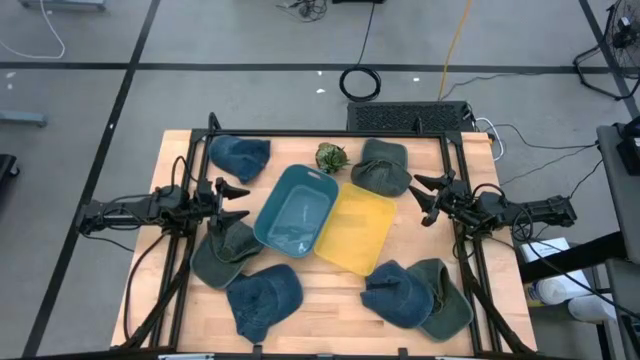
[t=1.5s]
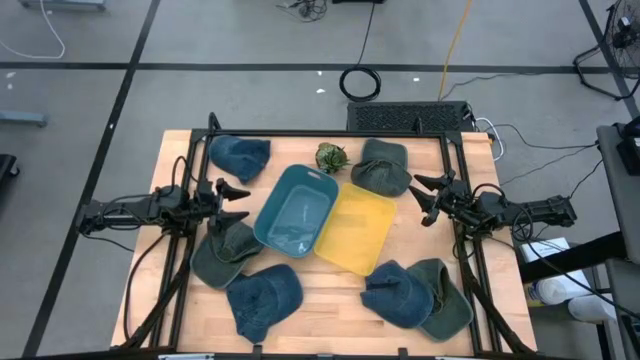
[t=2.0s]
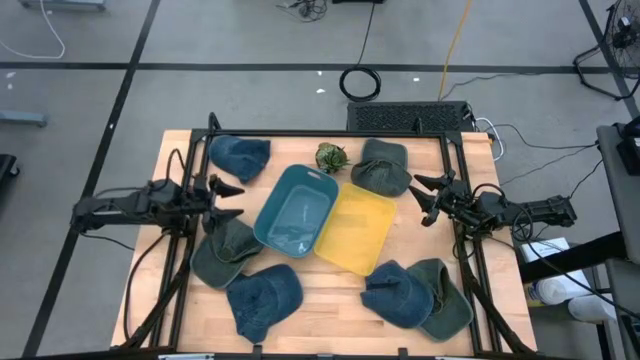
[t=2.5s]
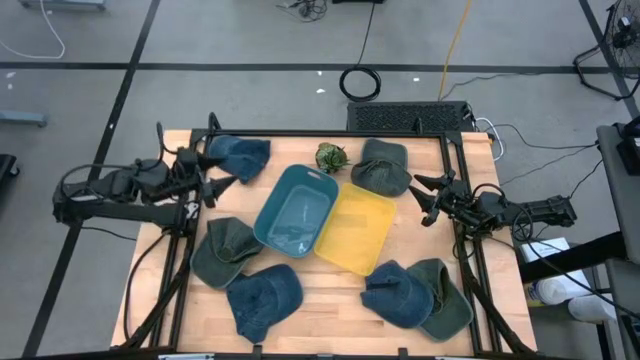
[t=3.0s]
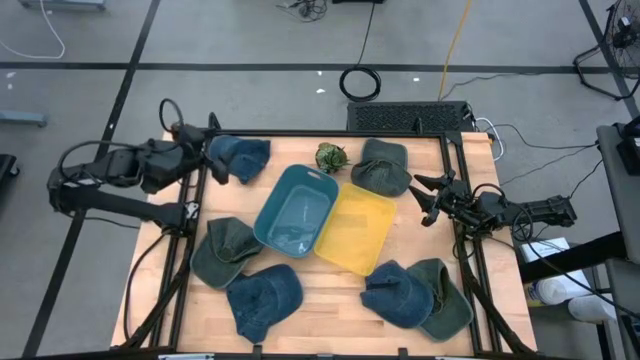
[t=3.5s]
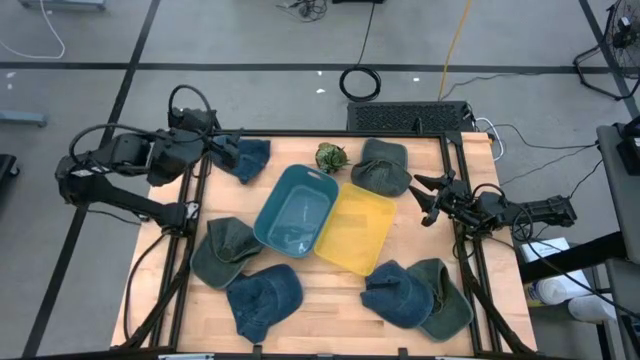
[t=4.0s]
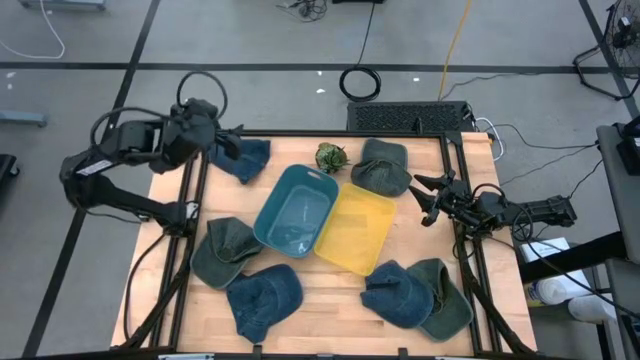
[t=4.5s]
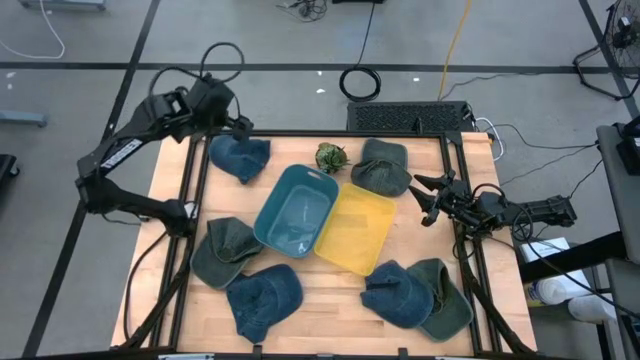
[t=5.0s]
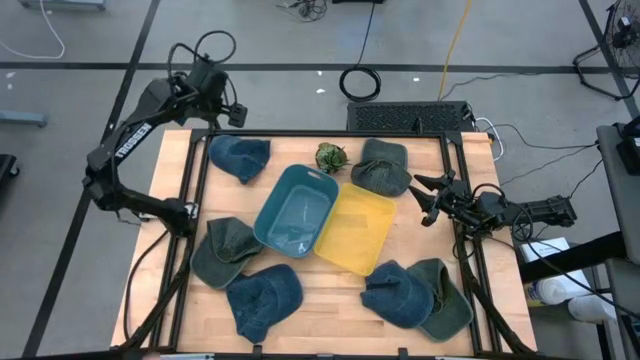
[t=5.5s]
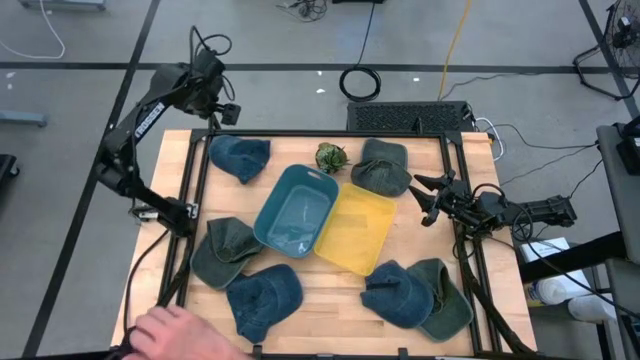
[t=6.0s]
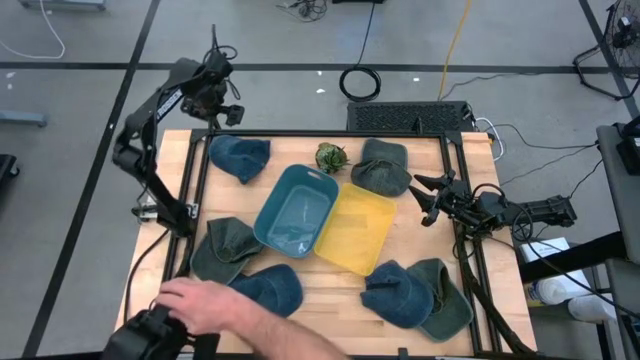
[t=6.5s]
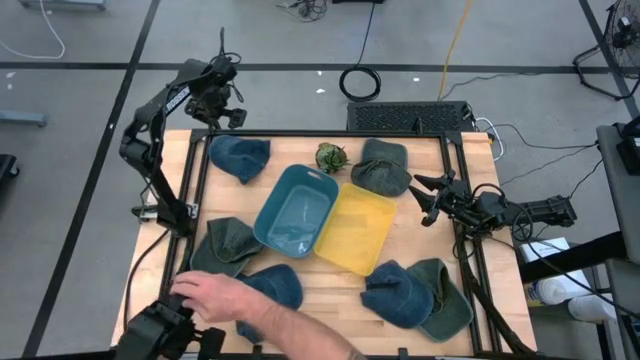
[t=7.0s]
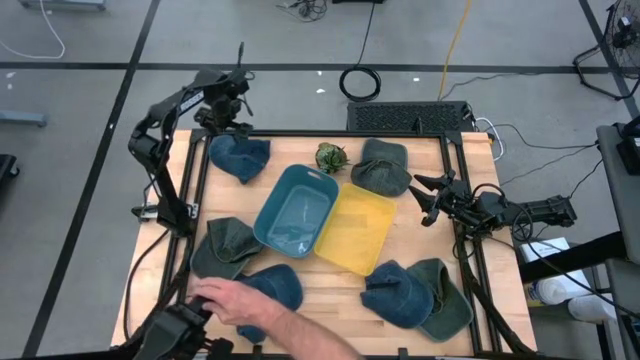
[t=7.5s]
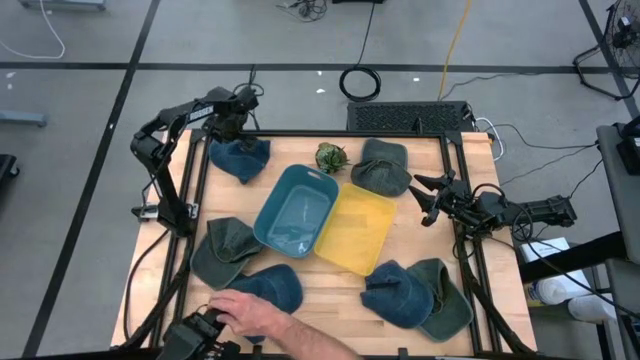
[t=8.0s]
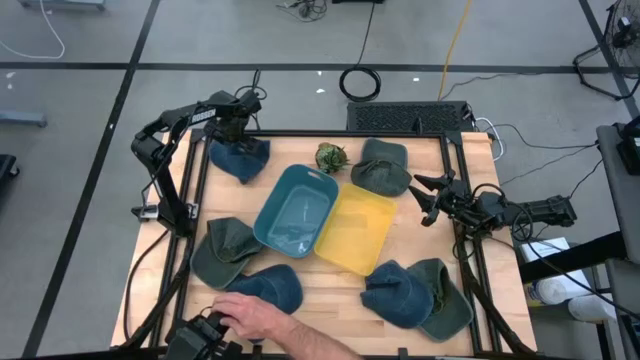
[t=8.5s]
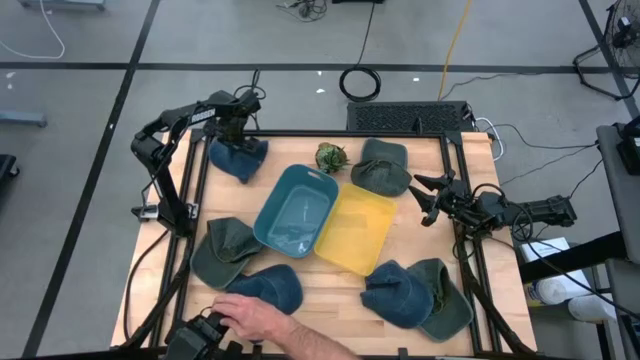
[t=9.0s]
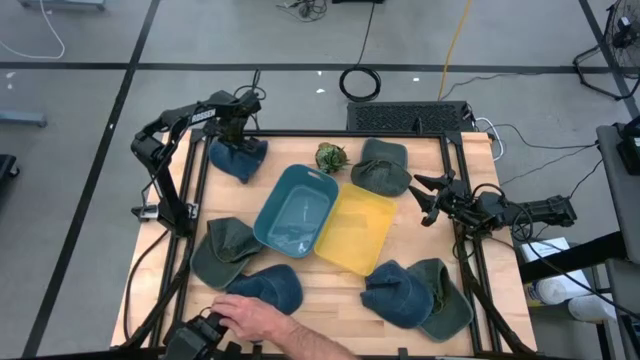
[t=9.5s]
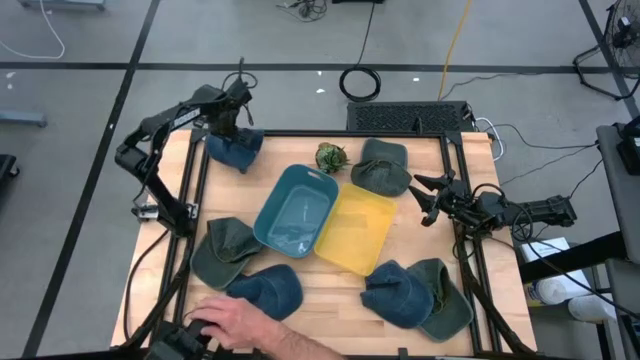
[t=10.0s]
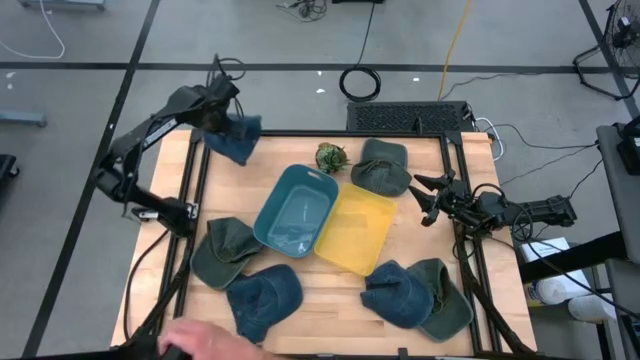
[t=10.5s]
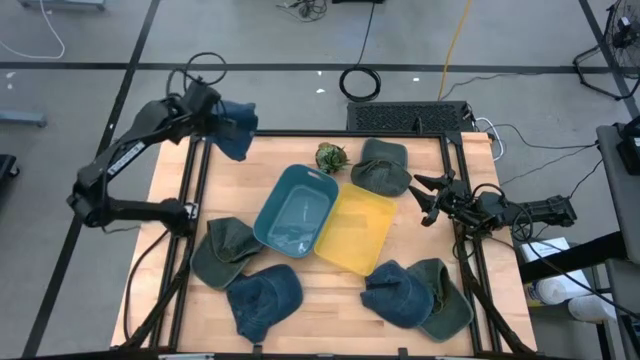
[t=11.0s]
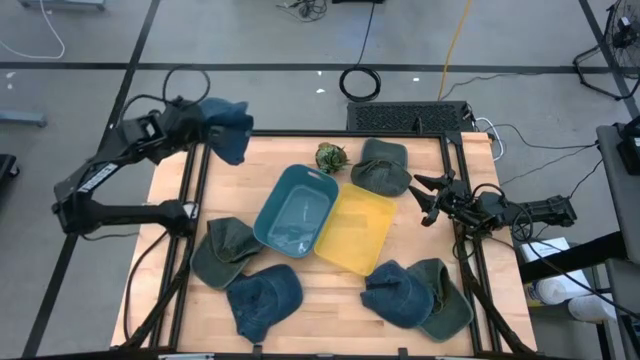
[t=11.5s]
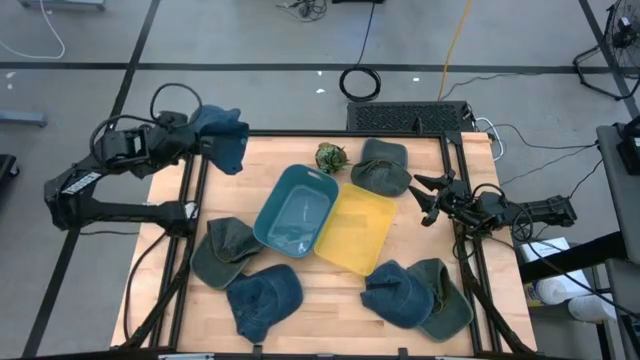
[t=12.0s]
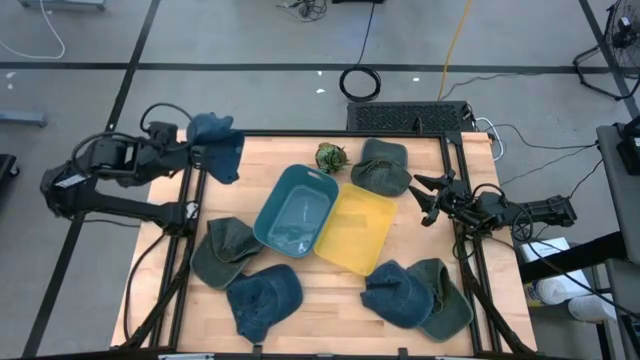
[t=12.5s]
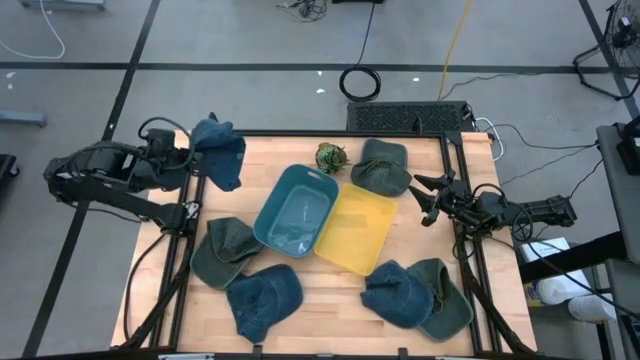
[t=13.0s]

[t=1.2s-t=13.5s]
Task: Pick & Place hat
Put the top blue cap into the yellow bin

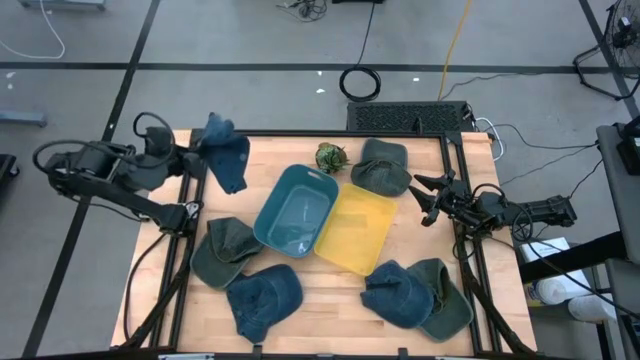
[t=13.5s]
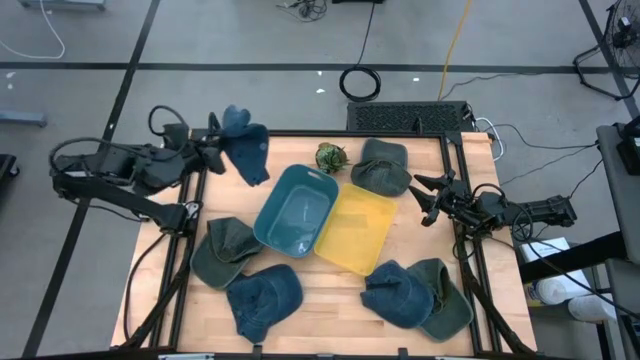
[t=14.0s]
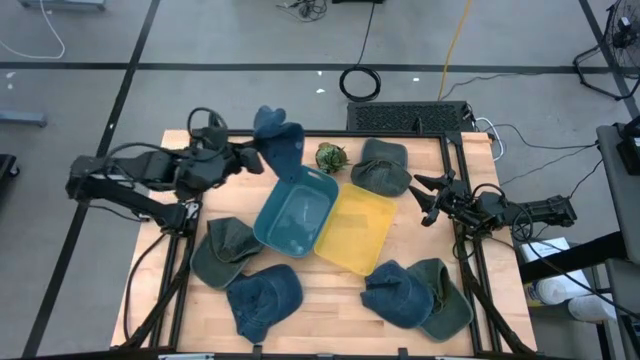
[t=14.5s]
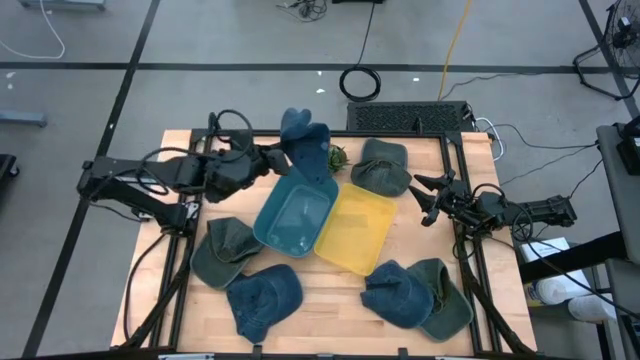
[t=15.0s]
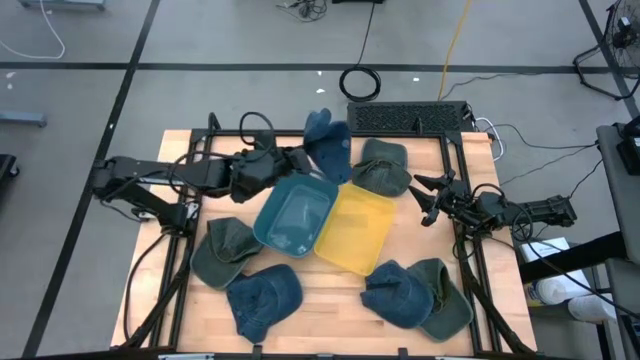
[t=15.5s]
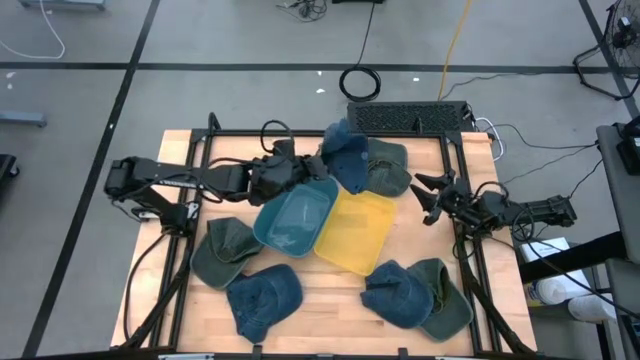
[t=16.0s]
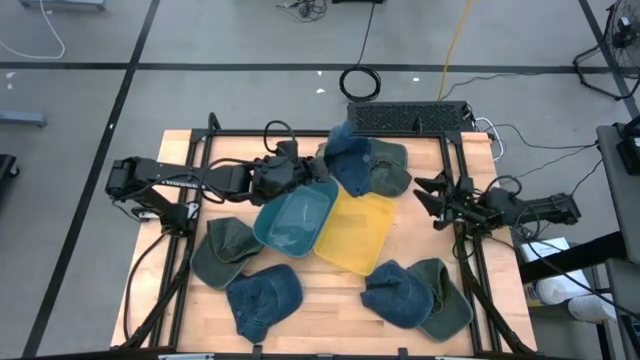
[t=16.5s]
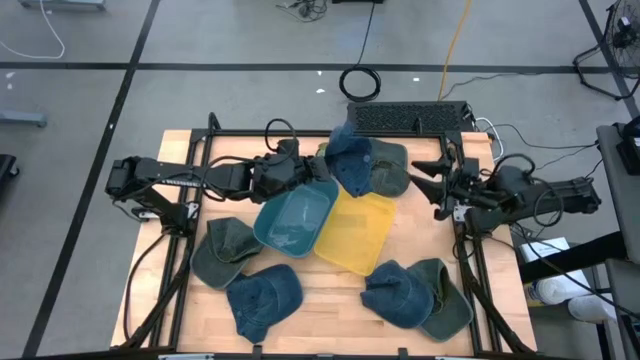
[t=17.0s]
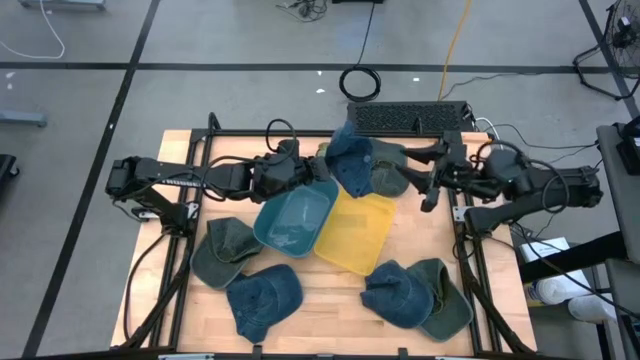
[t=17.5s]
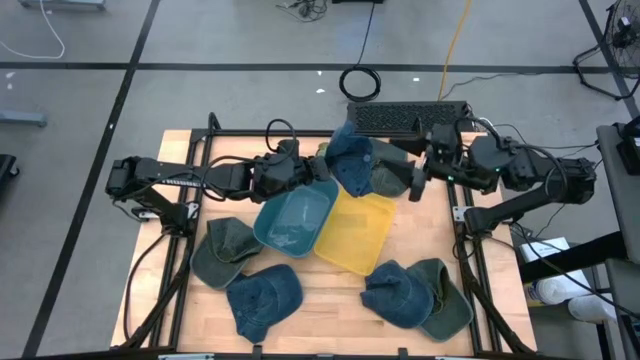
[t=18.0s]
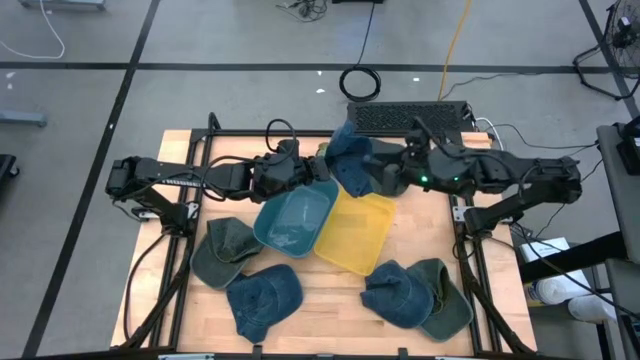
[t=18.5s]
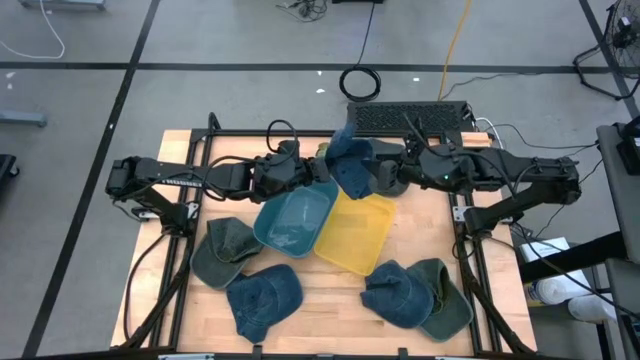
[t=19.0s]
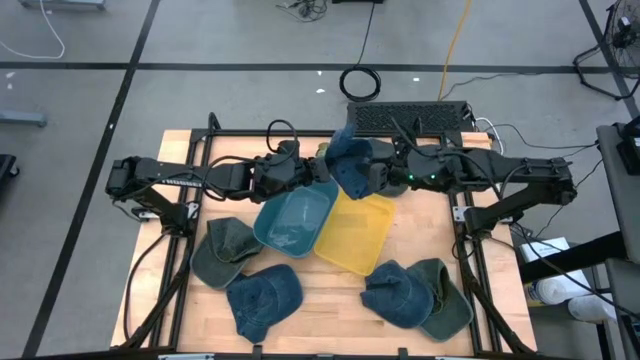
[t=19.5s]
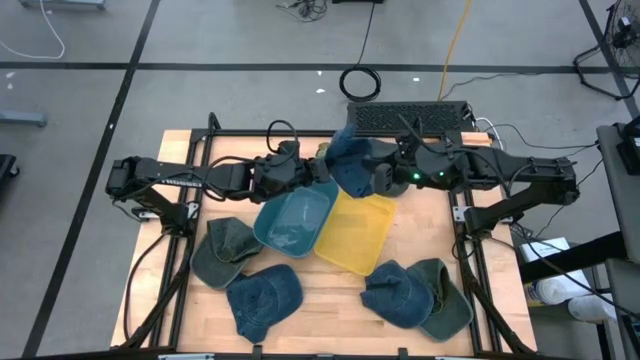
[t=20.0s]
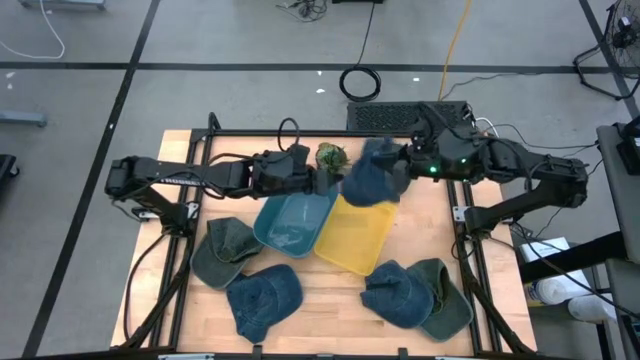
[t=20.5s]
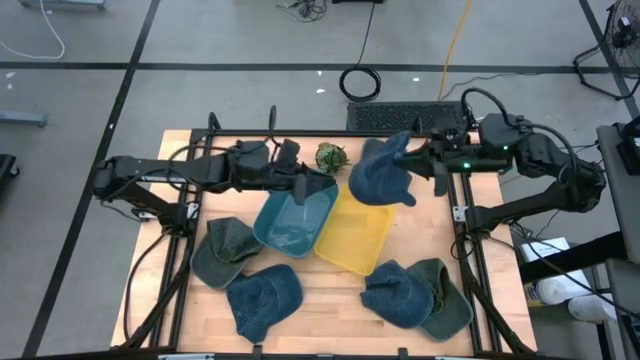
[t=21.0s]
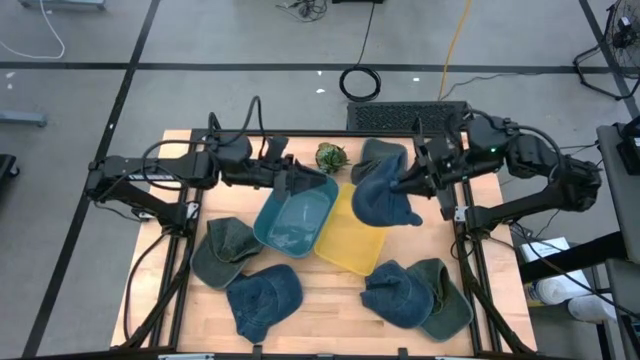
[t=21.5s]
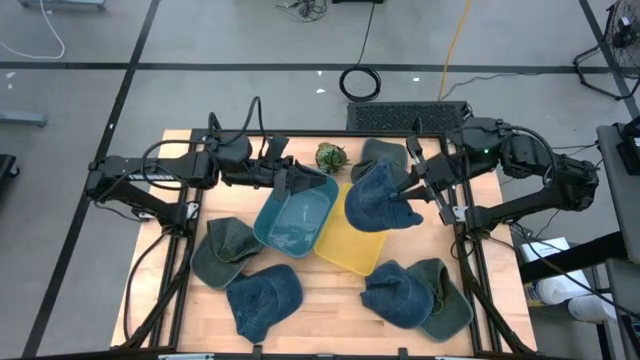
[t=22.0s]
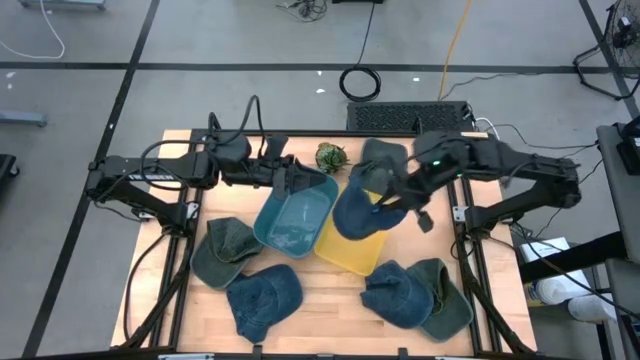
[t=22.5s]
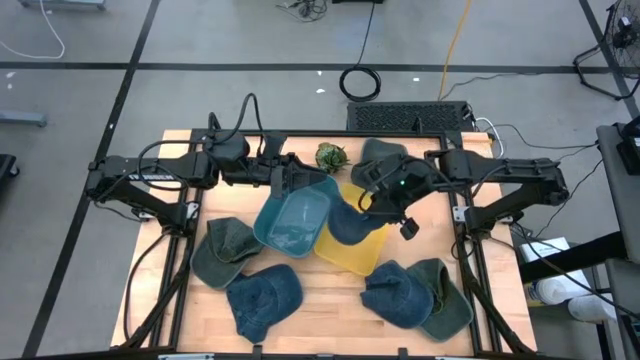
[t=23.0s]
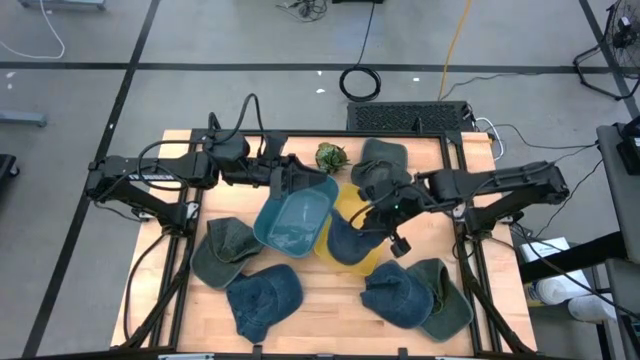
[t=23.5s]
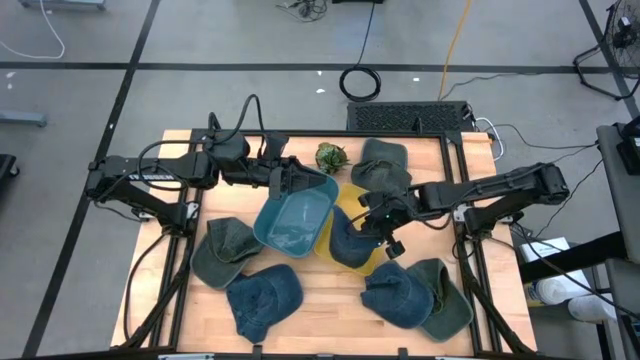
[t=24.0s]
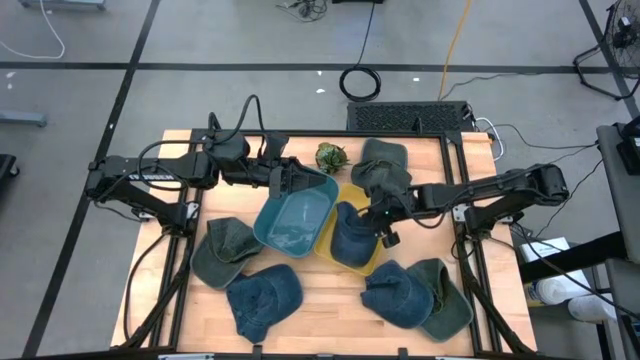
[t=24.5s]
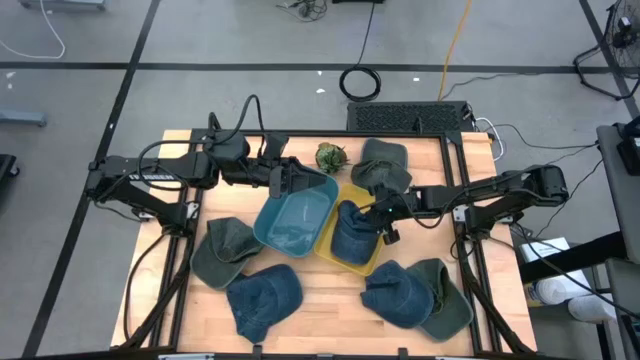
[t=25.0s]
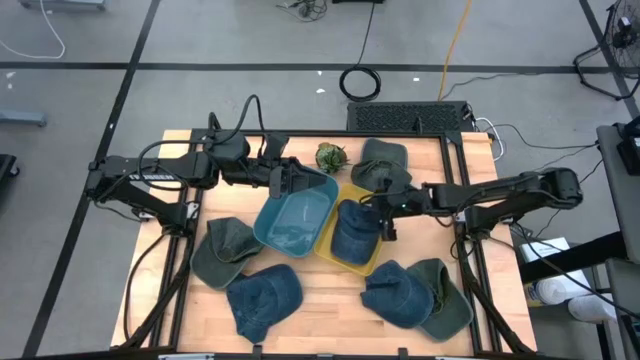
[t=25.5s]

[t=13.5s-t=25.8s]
Put the top blue cap into the yellow bin
